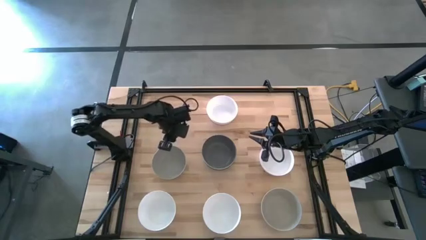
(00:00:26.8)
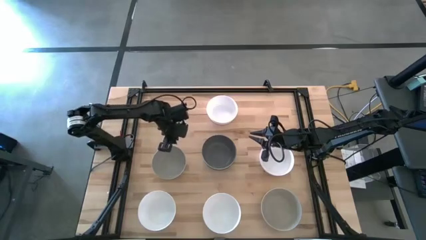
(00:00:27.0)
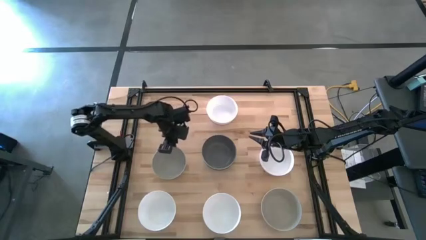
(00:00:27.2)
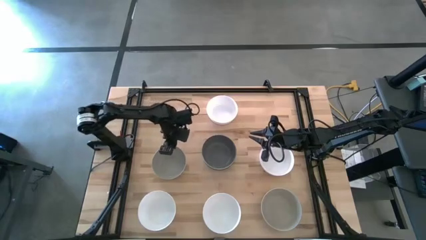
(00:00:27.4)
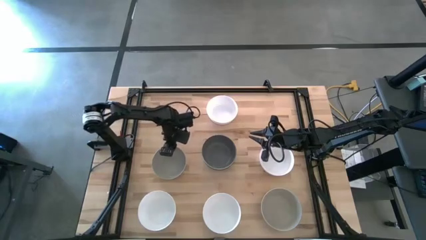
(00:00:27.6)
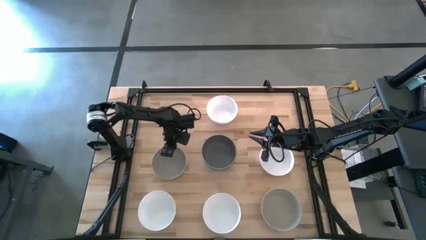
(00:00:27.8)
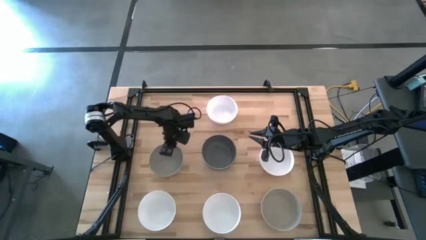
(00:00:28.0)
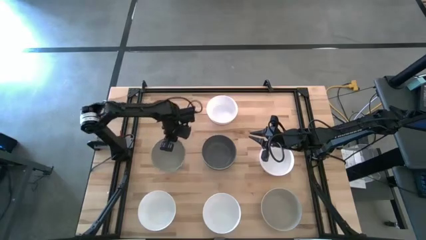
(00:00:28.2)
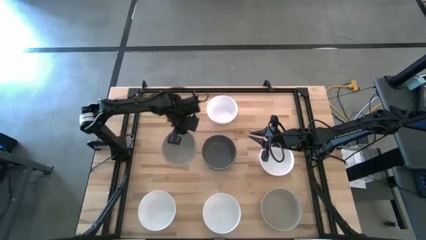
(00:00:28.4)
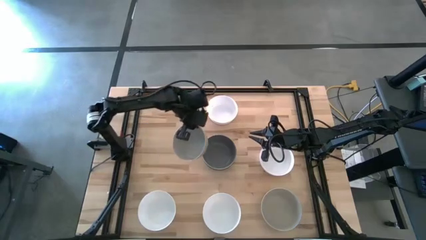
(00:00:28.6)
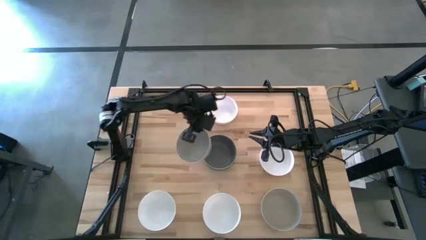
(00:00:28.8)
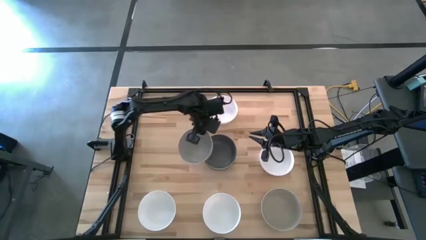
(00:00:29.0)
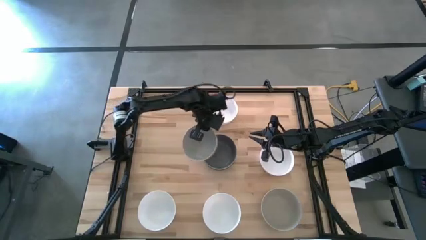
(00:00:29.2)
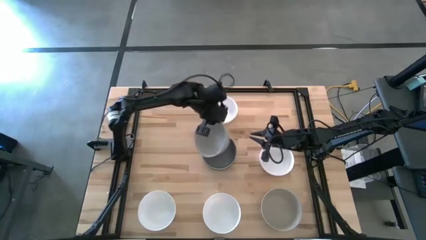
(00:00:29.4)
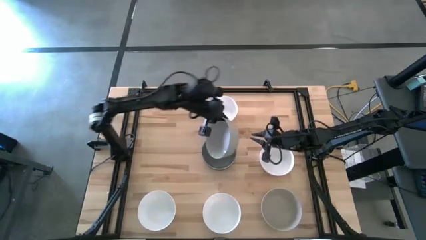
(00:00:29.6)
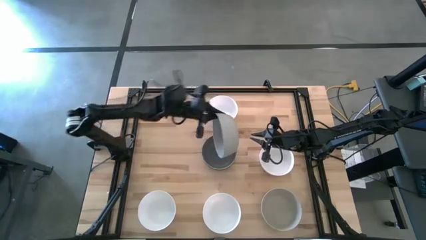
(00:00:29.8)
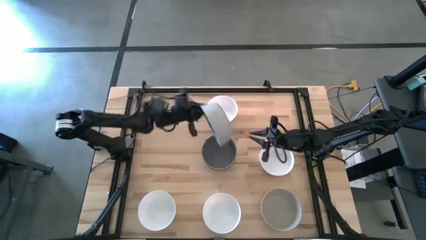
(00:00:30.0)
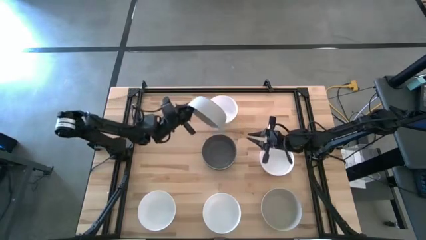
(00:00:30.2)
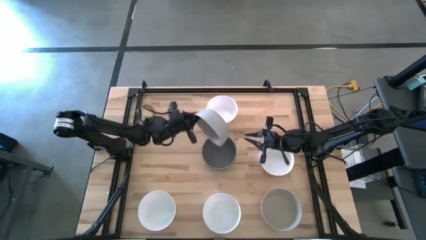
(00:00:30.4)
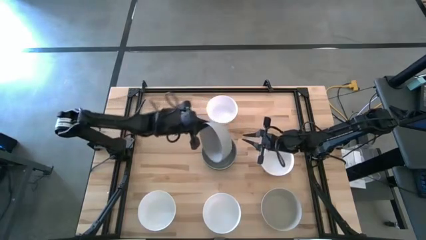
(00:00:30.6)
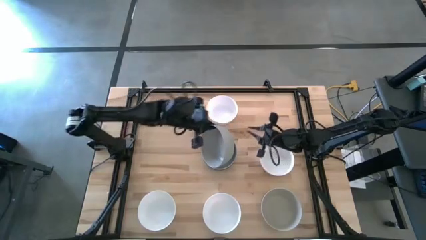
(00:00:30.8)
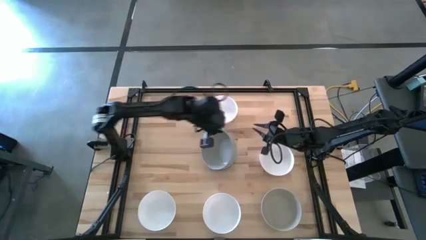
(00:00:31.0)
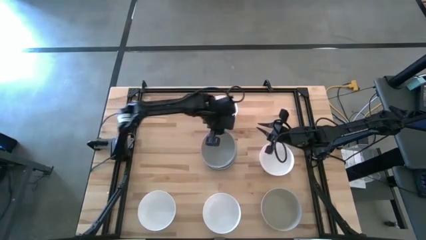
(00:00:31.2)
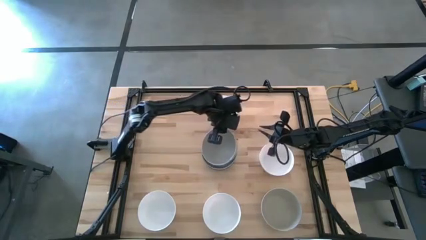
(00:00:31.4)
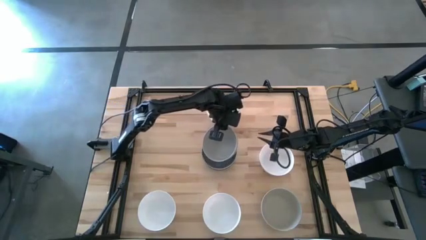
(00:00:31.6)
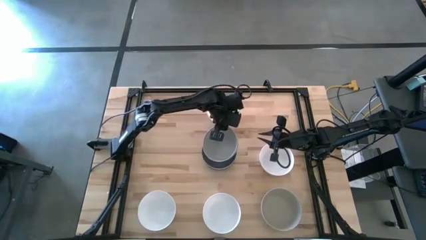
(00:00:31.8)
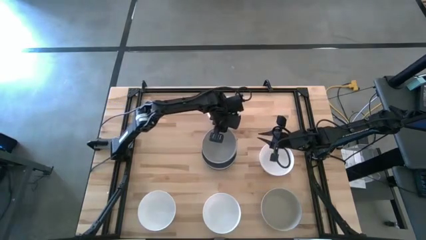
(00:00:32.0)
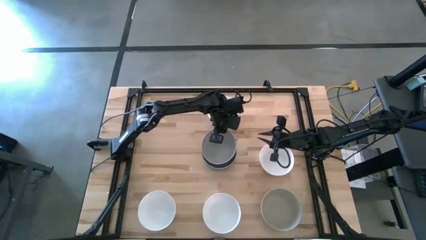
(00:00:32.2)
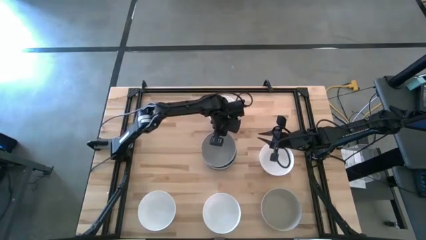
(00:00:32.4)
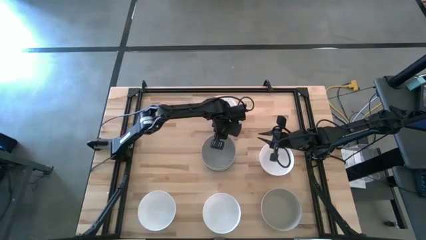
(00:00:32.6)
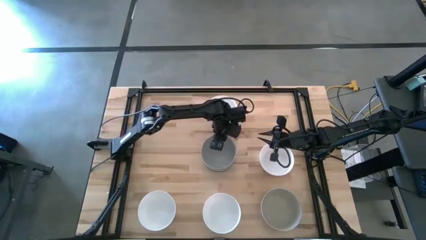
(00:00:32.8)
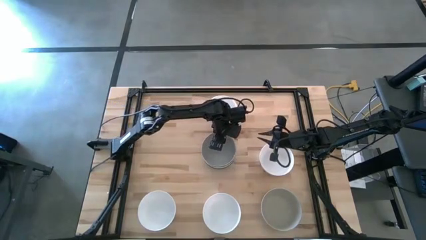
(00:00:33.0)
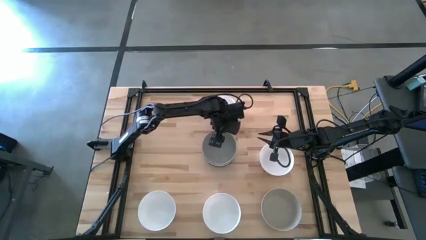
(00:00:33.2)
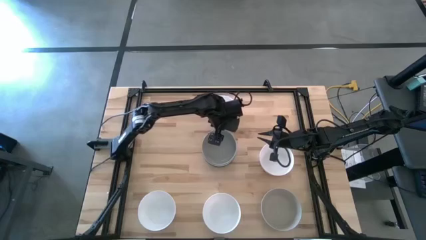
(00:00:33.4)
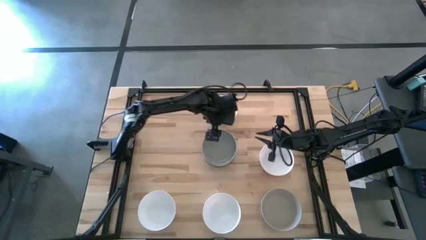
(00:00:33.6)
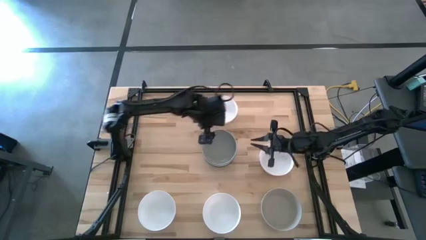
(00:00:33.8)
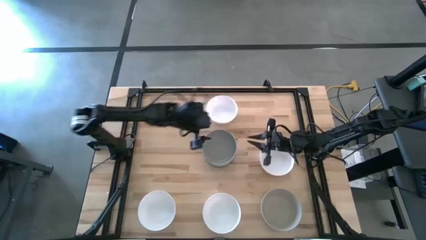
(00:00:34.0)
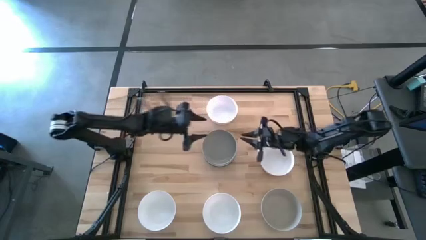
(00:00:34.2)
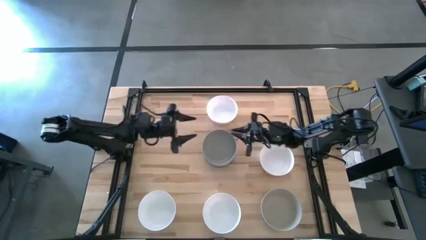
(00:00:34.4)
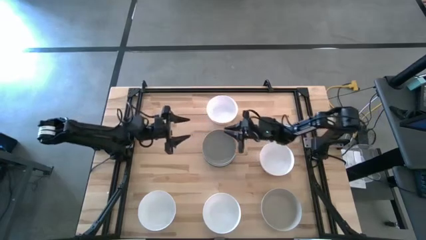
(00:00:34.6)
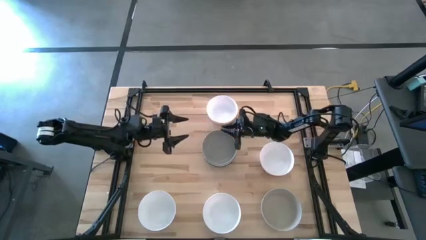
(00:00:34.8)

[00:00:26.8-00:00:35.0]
Task: Nest bowls inside each other
Stack the brown bowl on top of the dark gray bowl

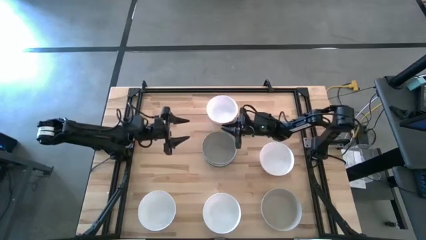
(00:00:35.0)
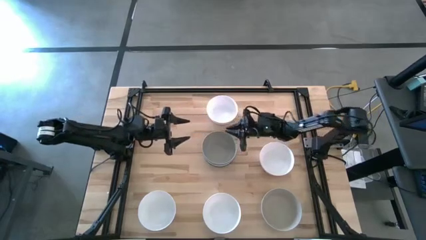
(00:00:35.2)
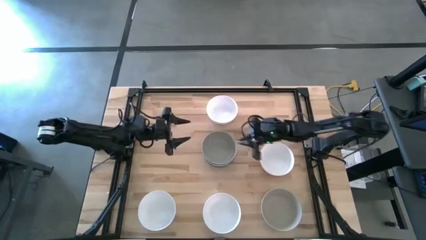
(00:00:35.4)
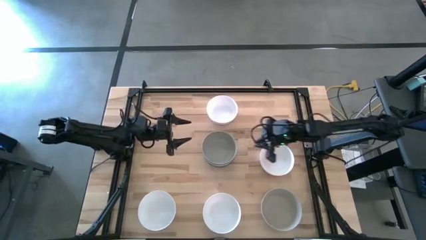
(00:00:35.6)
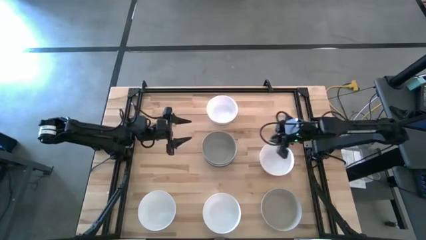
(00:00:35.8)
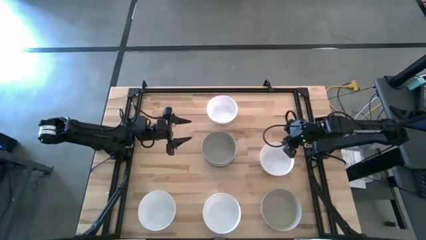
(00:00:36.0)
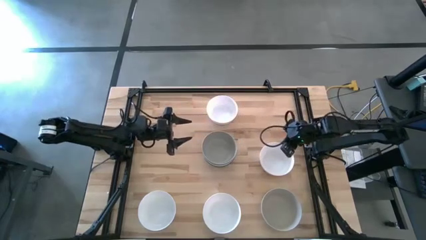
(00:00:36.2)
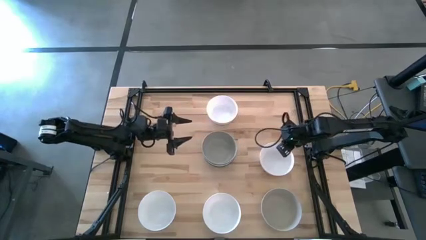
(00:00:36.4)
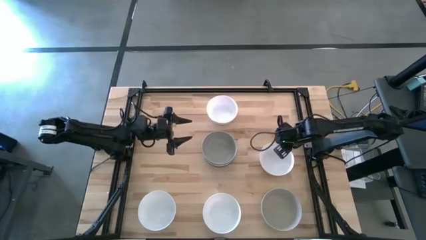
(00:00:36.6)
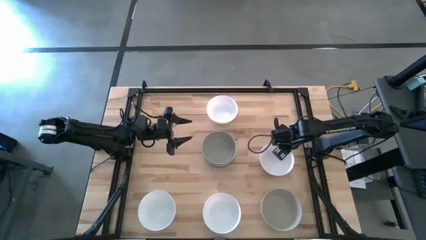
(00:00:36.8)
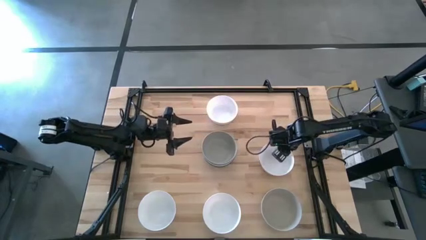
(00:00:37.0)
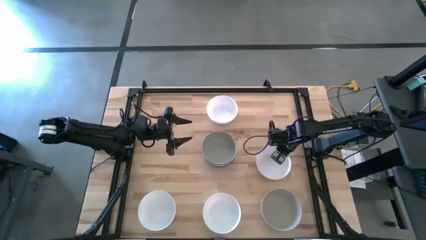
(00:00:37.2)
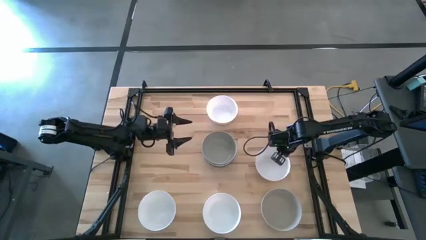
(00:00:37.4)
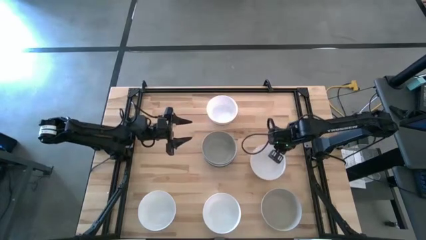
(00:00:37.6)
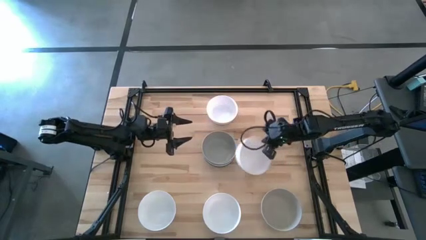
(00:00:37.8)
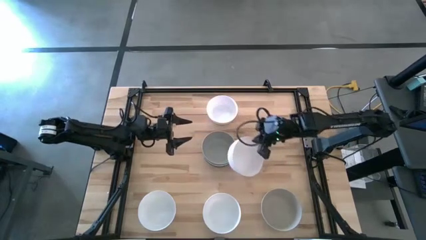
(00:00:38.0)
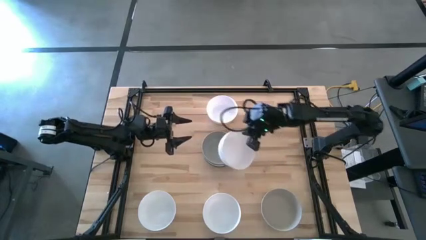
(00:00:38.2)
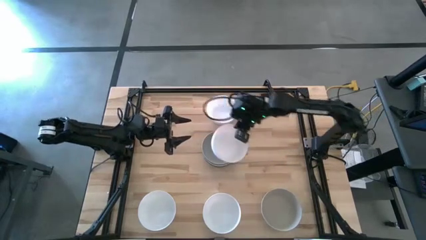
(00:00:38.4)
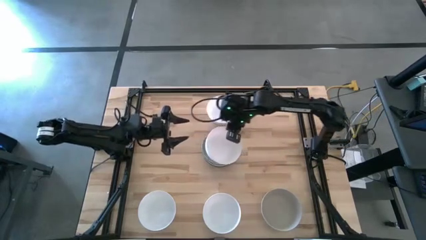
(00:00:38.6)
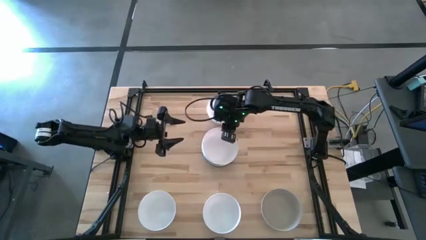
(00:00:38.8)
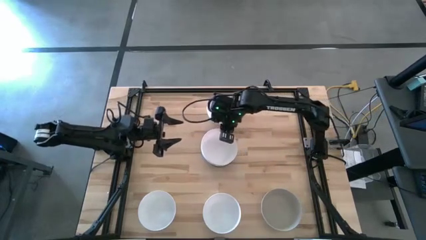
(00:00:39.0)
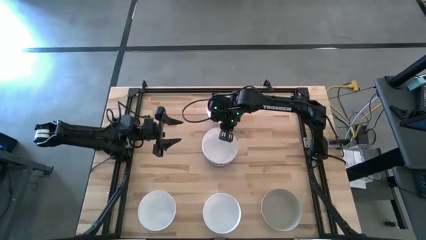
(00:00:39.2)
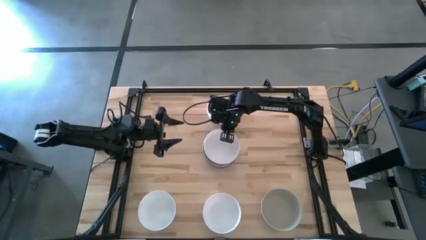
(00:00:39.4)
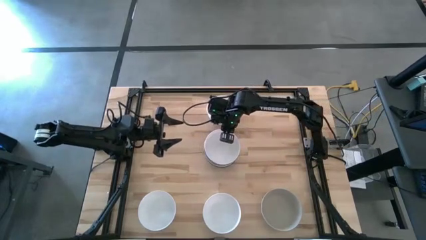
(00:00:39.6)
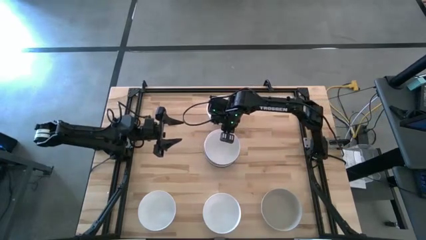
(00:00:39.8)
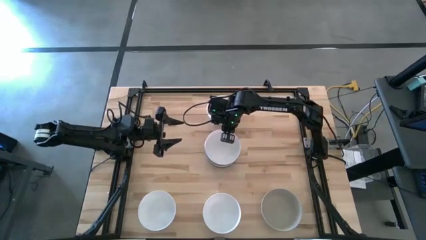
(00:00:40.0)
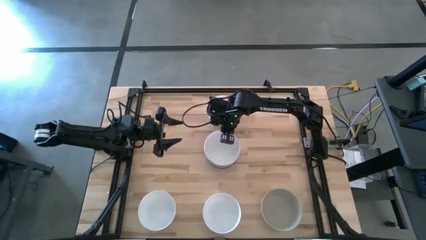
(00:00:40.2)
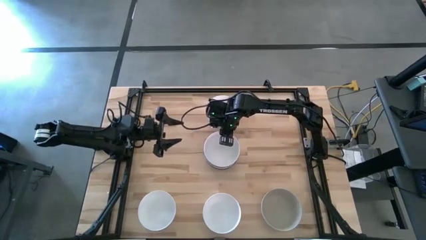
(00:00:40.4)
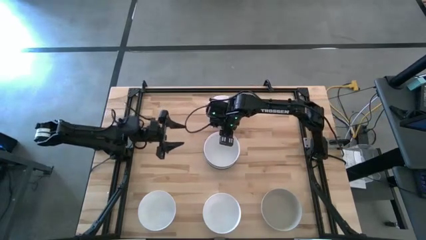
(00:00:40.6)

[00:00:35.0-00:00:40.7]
Stack the white bowl on top of the brown bowl
